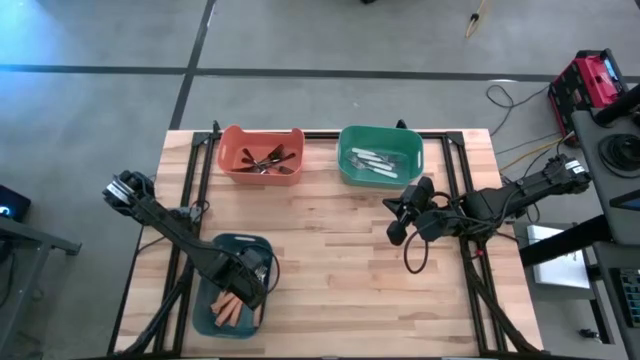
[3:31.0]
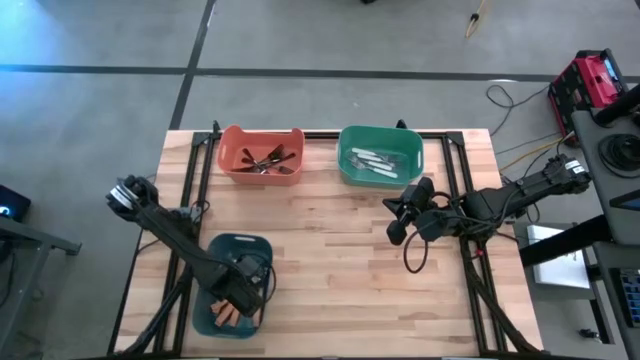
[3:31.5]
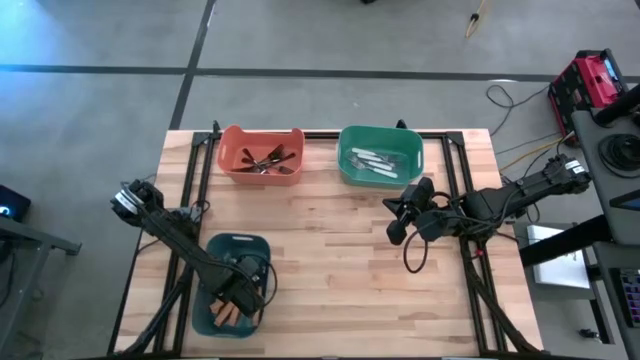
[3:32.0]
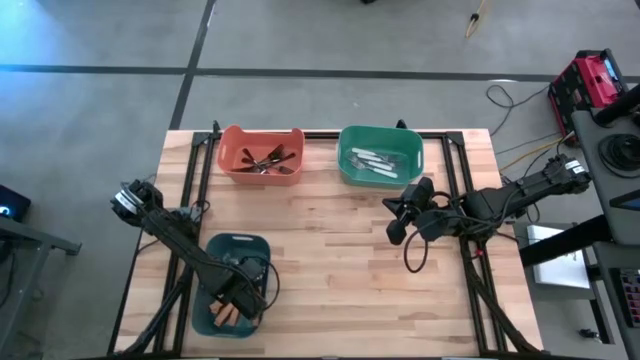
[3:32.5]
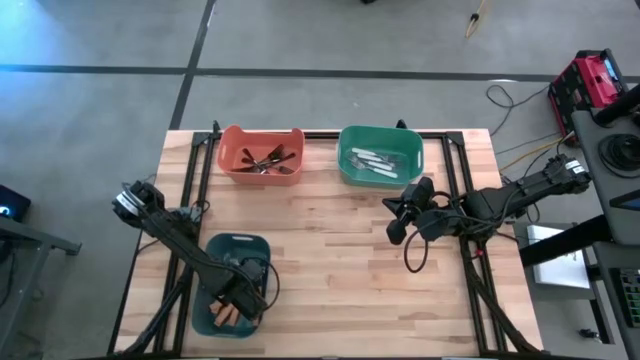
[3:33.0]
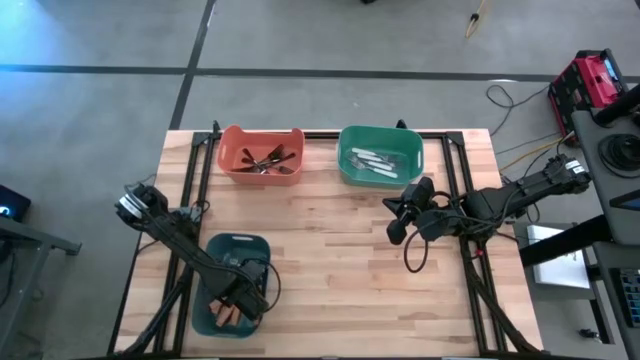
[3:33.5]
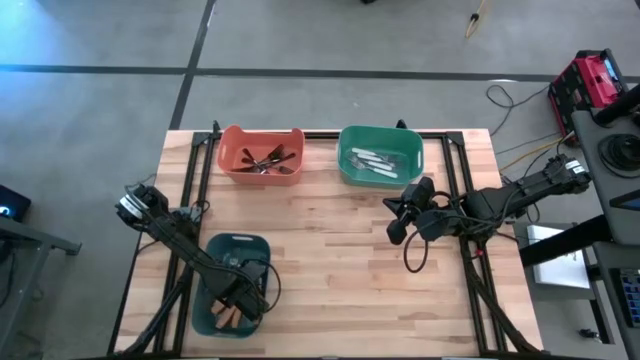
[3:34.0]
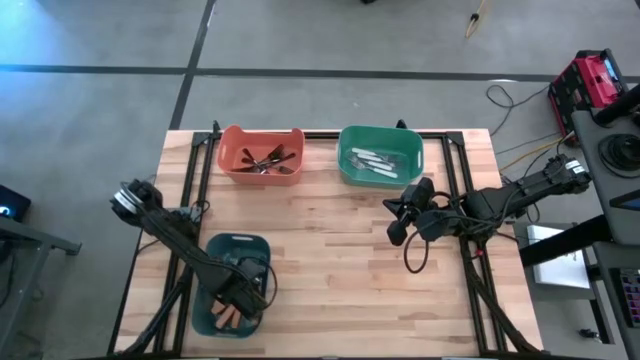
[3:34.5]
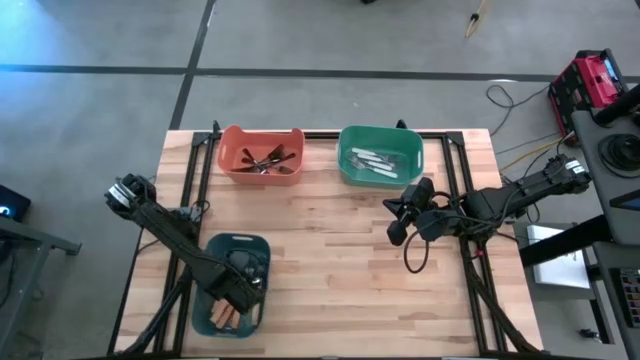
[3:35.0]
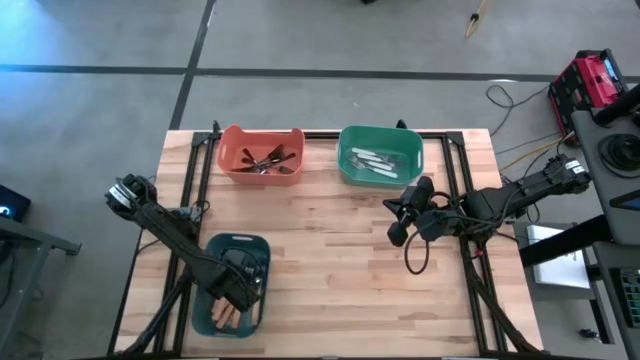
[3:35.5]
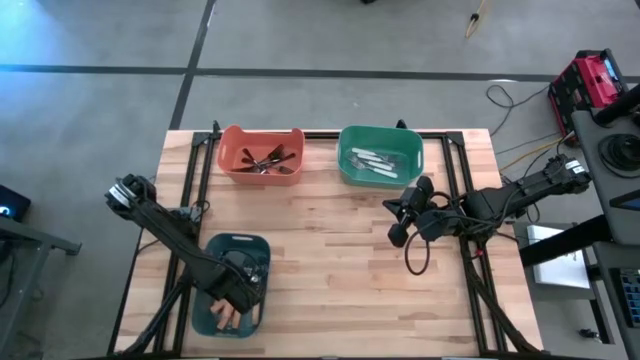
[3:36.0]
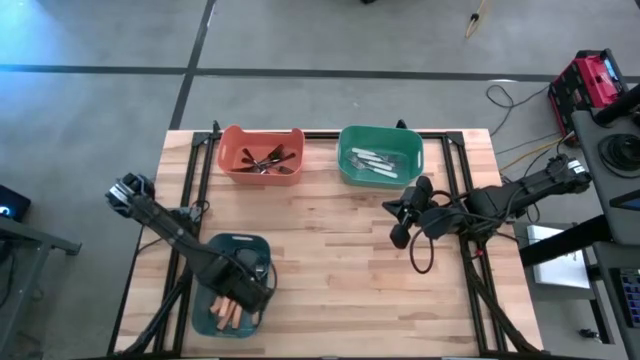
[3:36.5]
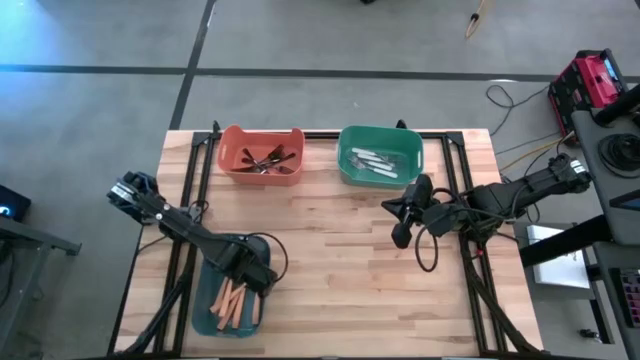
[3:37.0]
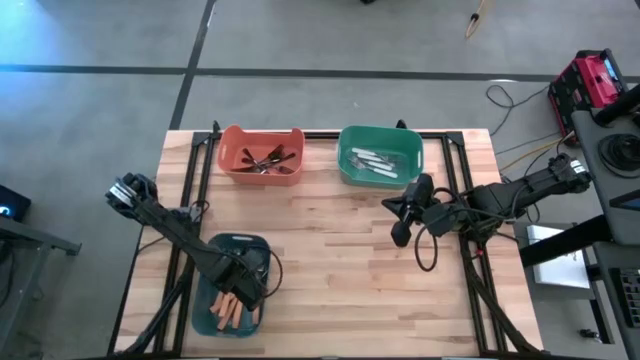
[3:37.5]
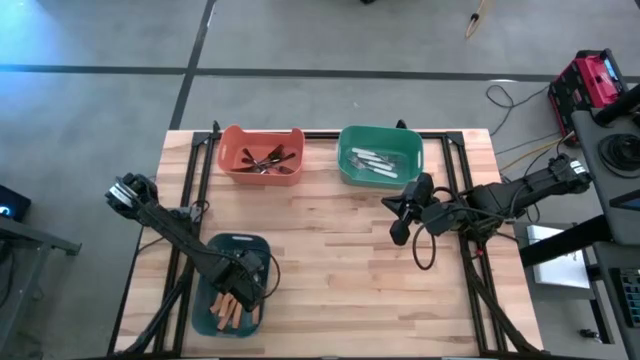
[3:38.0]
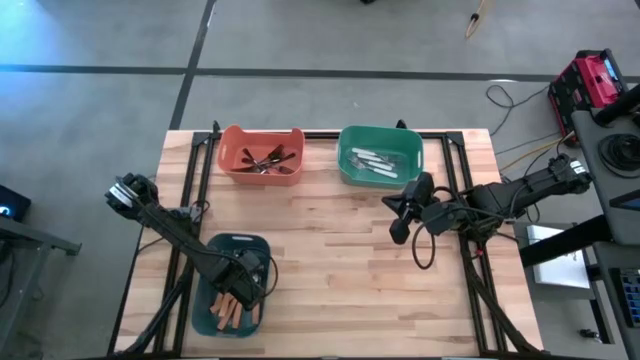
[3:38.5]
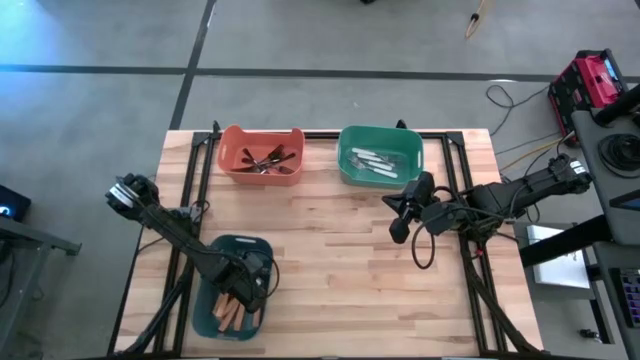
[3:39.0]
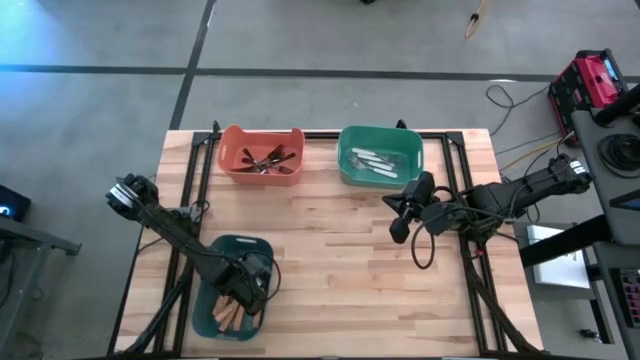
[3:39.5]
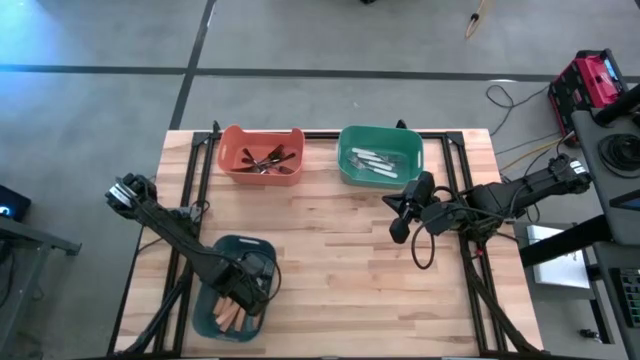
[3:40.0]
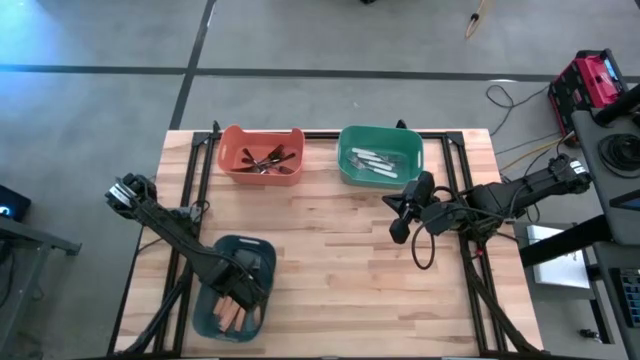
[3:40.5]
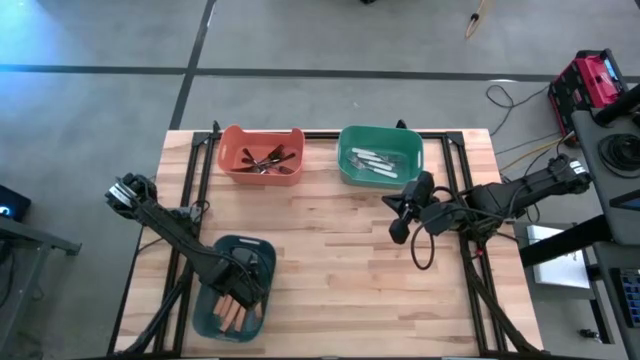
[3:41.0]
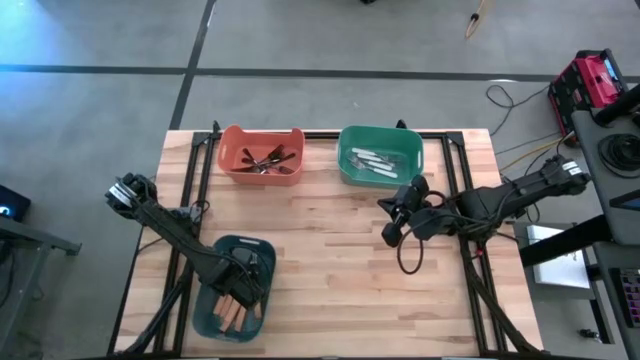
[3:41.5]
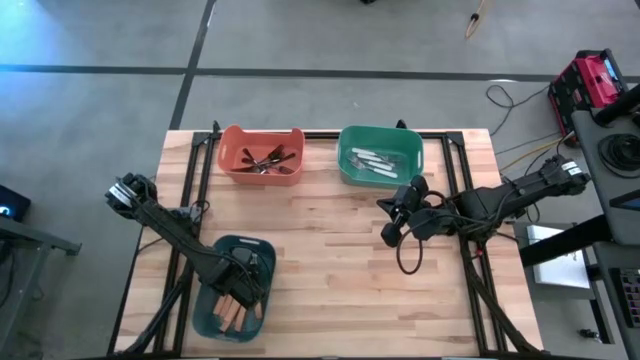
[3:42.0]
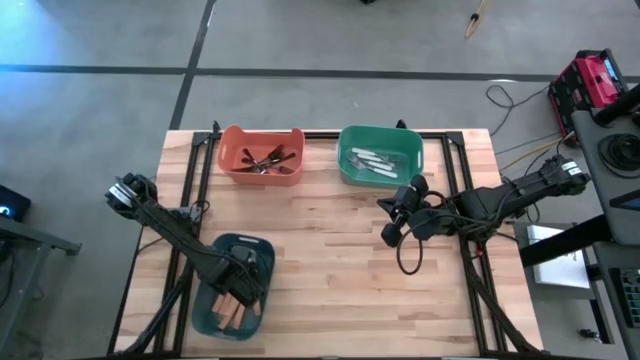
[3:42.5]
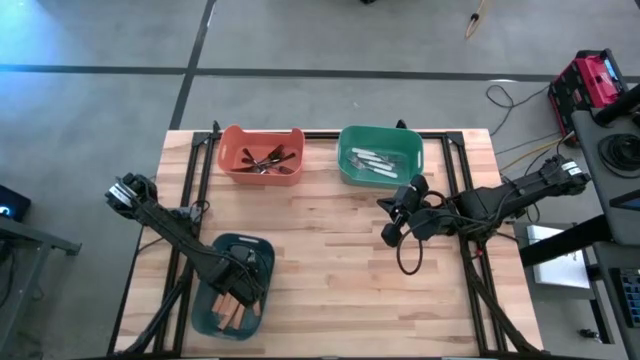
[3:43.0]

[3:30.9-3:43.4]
Task: Sort silverware by color (type)
Adjust the orange forks in the blue-green bin

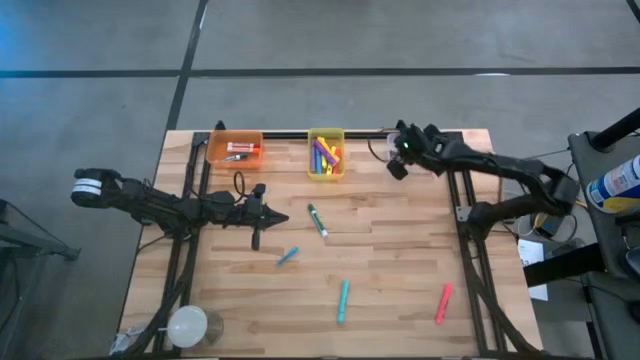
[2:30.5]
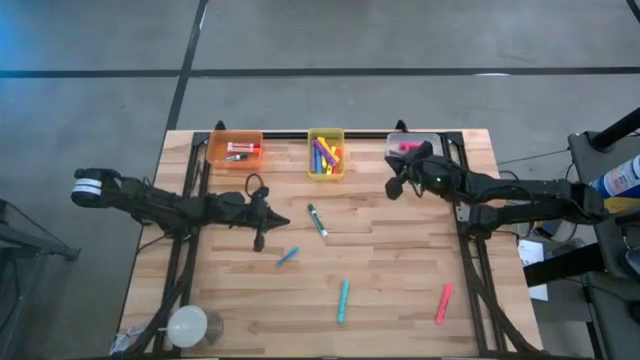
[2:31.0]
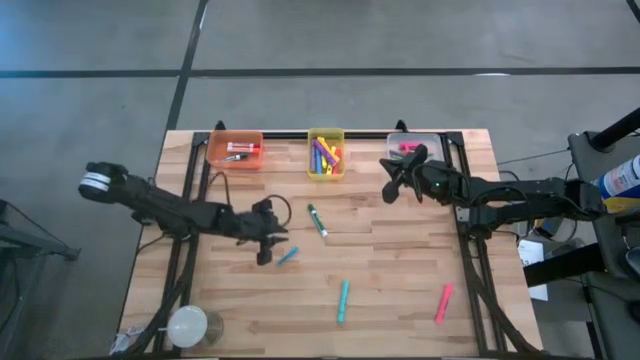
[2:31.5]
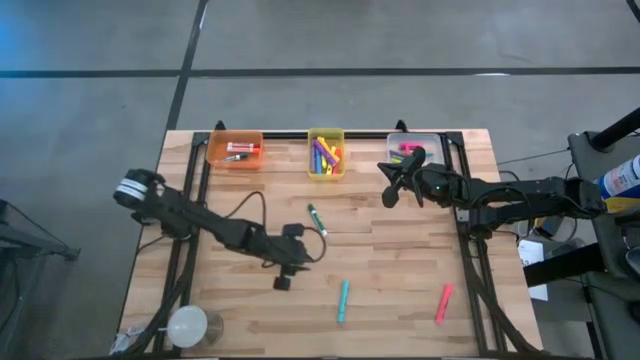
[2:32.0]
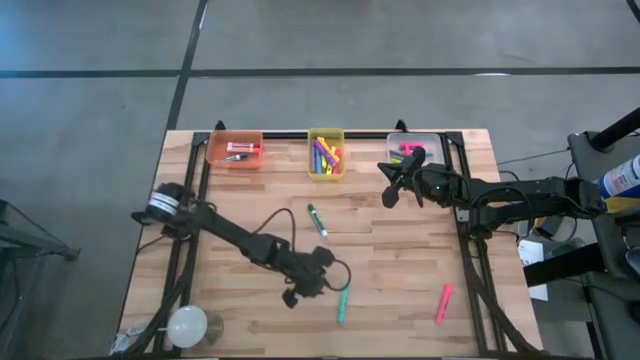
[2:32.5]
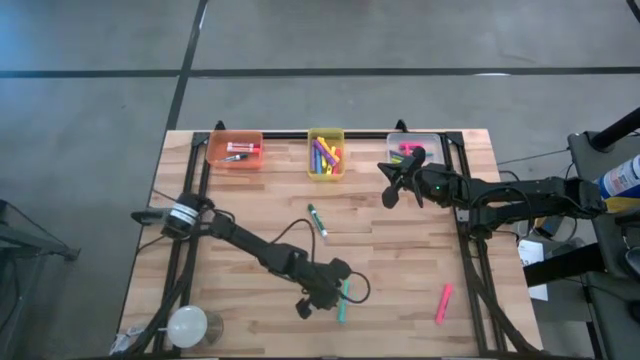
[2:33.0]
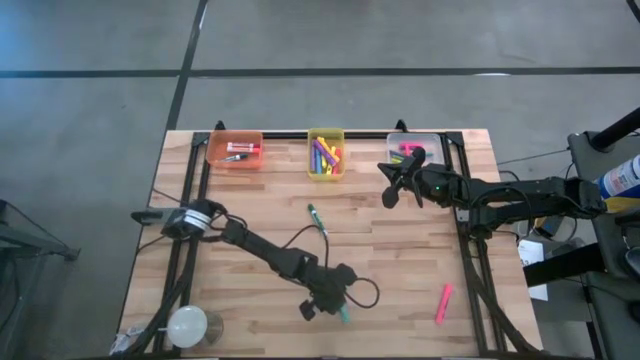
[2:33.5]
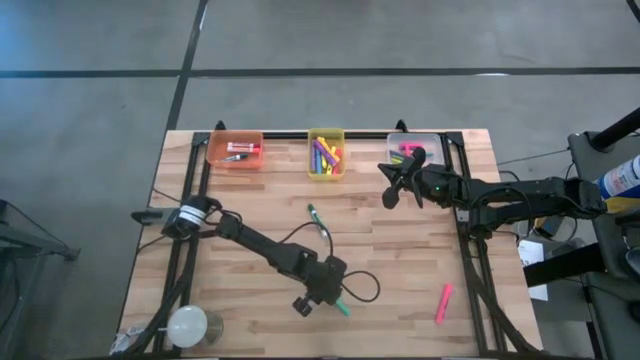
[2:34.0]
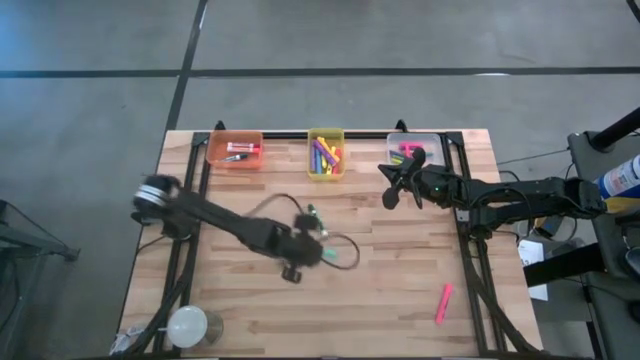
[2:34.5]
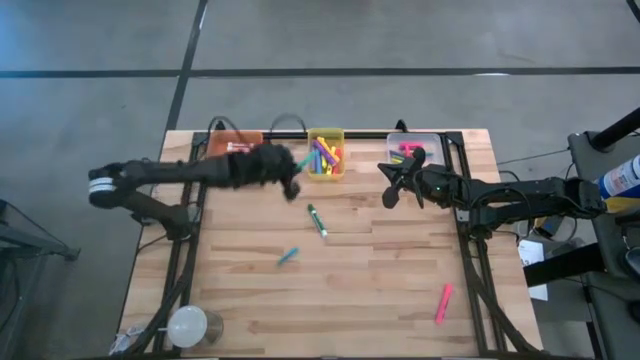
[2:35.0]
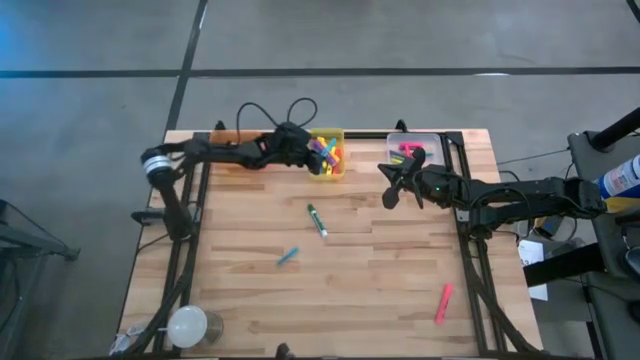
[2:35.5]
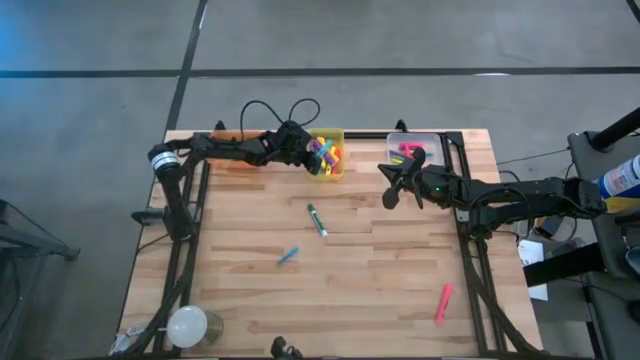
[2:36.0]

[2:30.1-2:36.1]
Task: Pick & Place Markers
Put the light blue highlighter pen into the yellow bin
